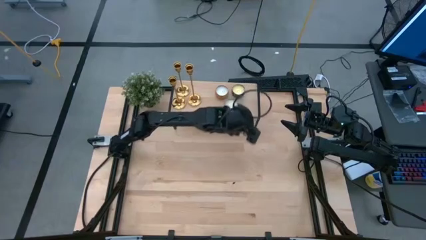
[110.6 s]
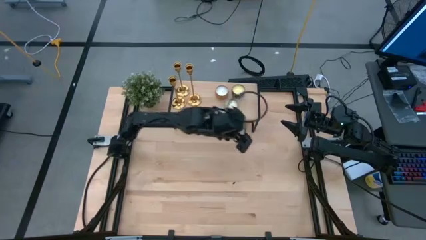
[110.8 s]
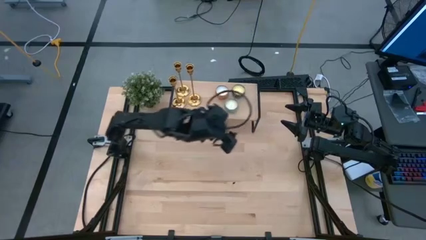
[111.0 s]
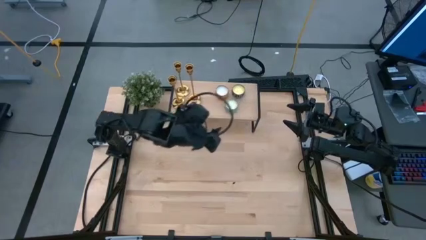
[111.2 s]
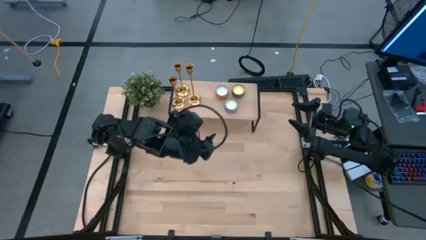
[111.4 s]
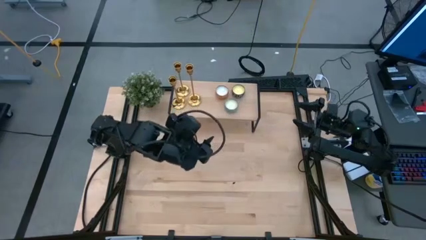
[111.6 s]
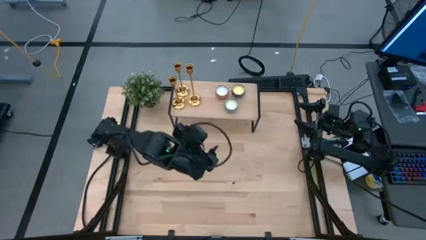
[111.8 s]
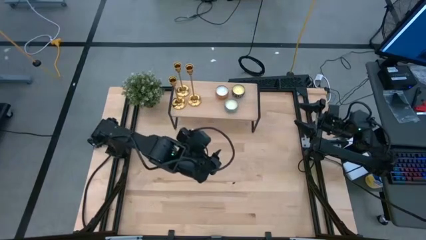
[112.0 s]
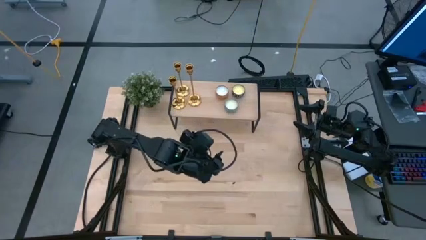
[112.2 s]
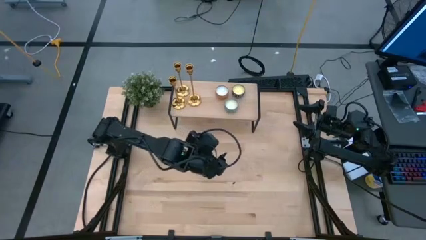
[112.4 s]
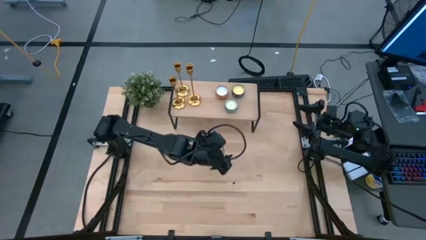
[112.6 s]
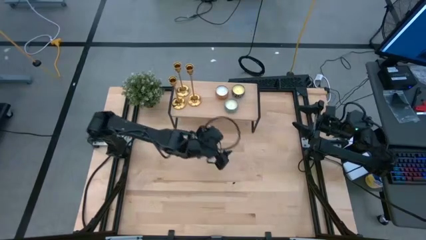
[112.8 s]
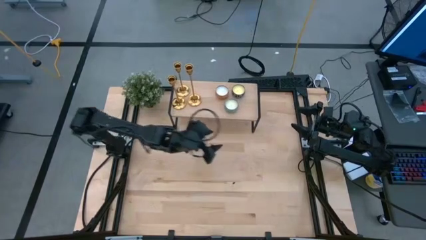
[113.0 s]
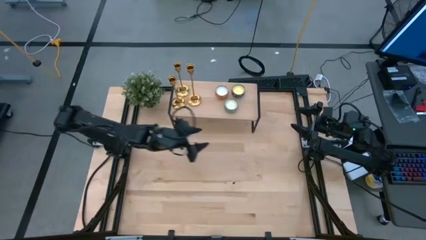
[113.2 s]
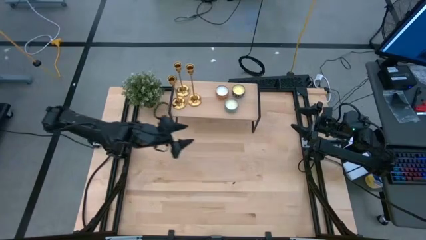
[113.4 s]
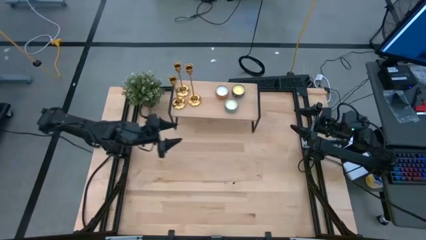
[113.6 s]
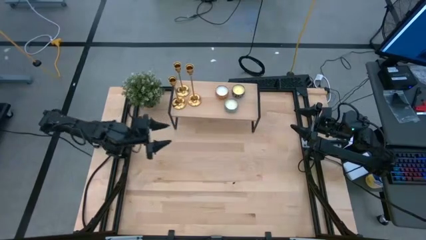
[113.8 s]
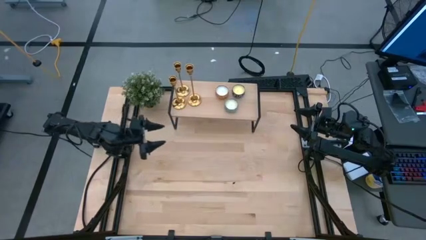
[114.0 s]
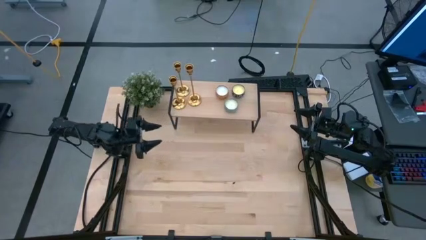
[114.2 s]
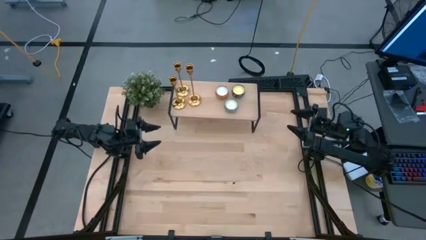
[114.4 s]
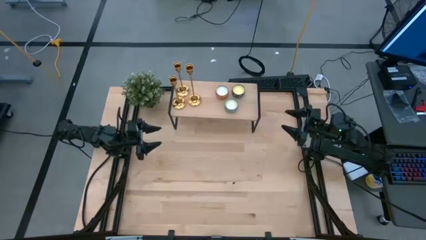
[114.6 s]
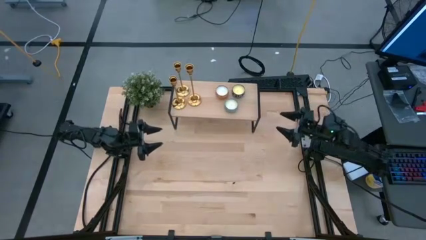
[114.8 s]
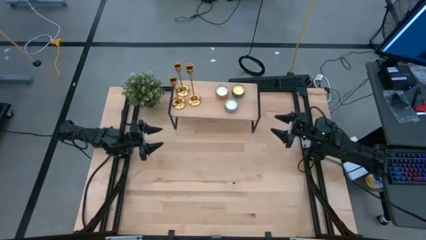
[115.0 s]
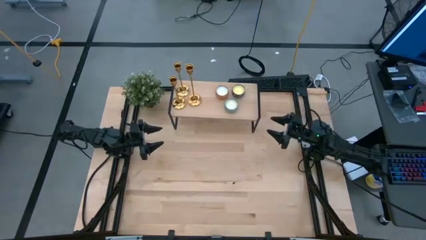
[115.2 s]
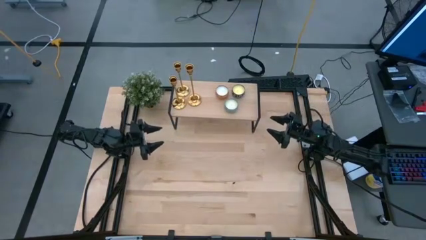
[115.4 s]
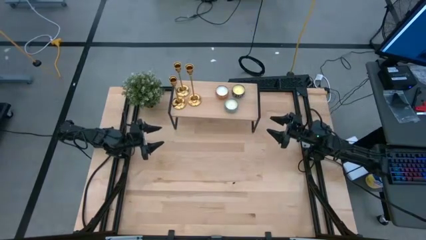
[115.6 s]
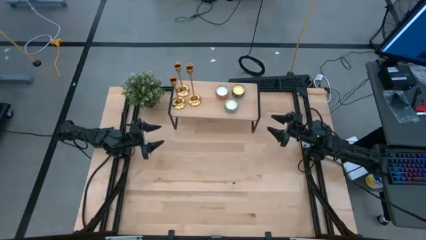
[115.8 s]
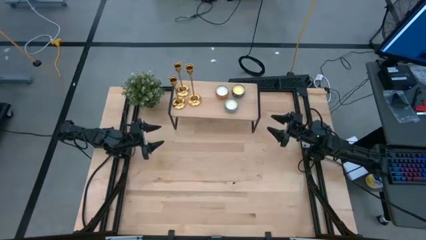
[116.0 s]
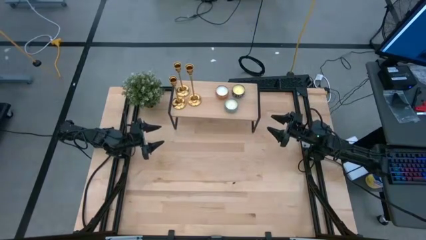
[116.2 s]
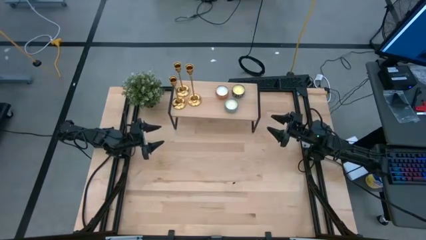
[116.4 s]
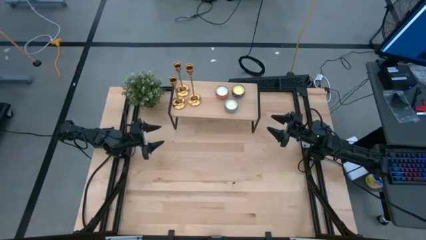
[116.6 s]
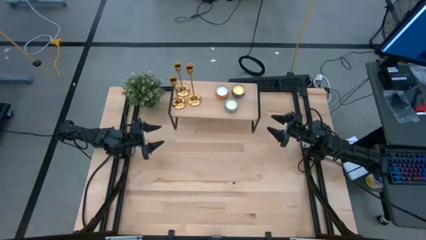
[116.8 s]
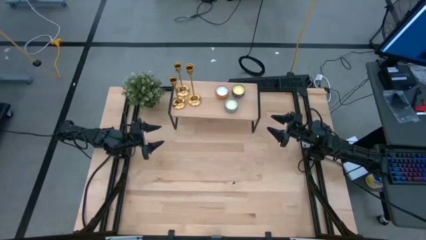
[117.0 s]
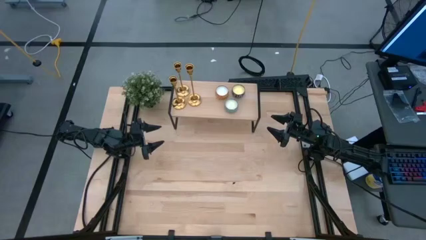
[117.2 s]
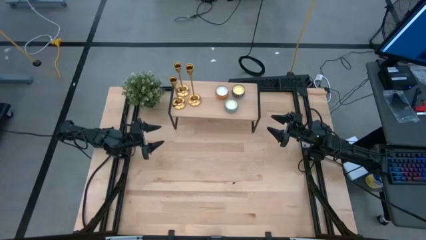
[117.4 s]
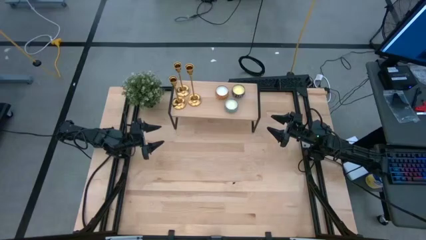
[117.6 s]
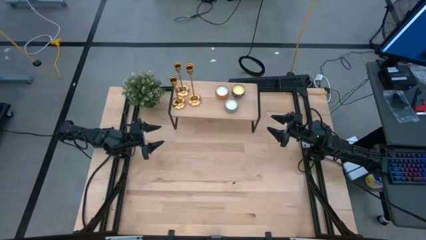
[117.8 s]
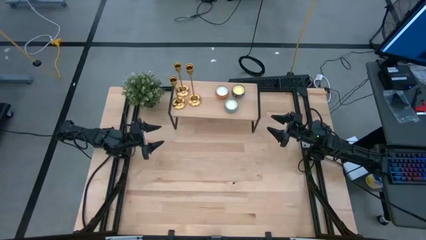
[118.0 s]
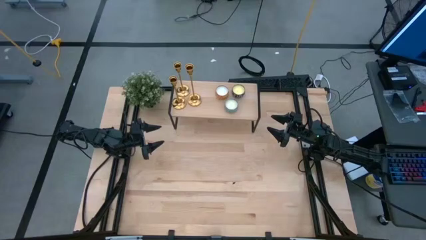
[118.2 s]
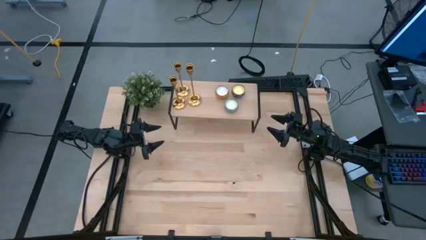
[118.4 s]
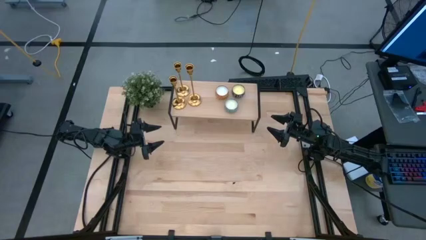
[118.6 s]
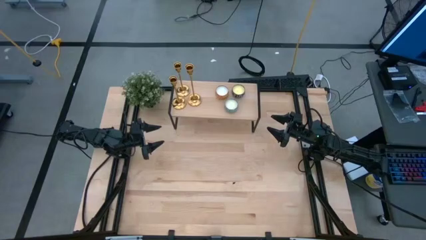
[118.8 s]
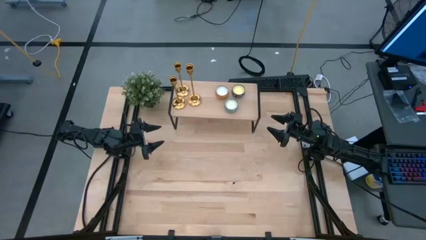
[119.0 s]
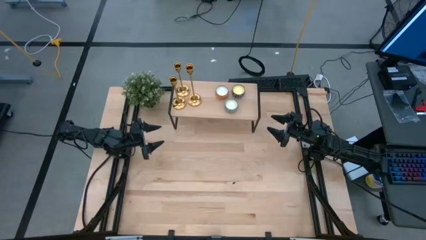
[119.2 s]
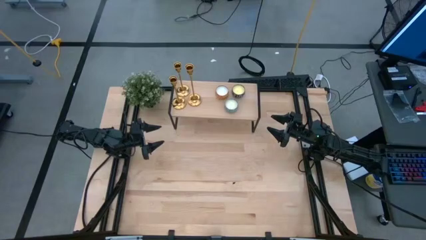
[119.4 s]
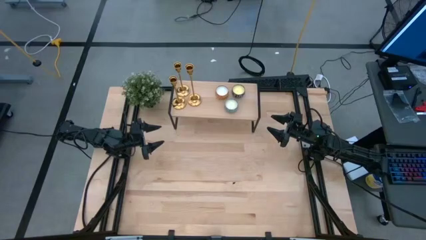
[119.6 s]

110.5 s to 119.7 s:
Task: Pick & Place candle stick holders
Return to Home Position

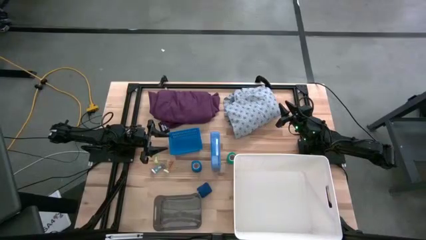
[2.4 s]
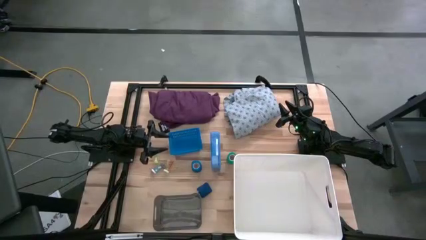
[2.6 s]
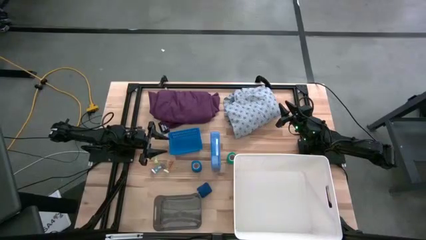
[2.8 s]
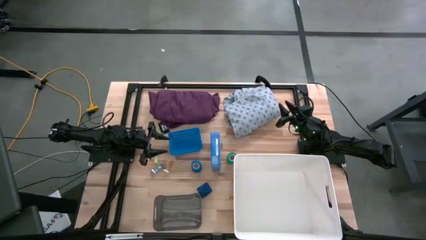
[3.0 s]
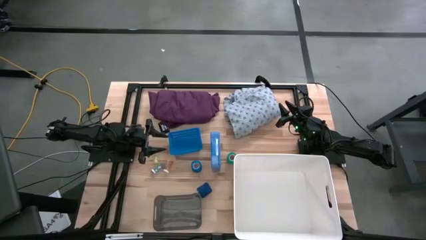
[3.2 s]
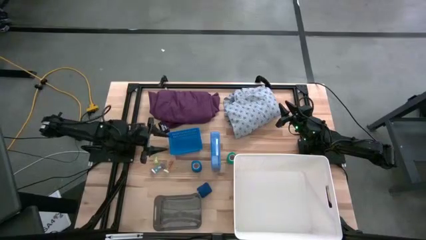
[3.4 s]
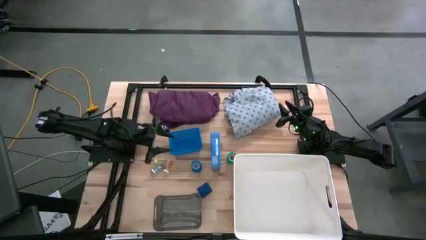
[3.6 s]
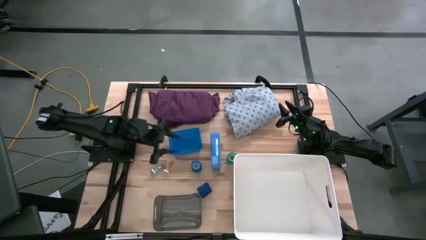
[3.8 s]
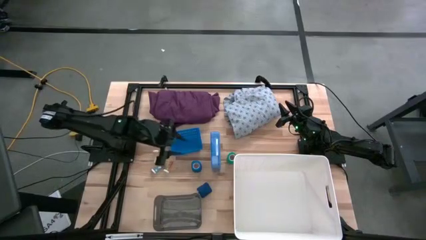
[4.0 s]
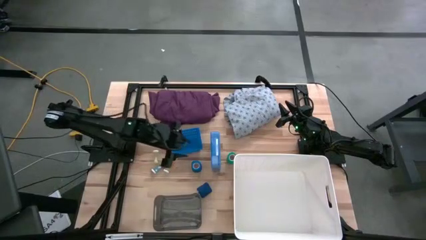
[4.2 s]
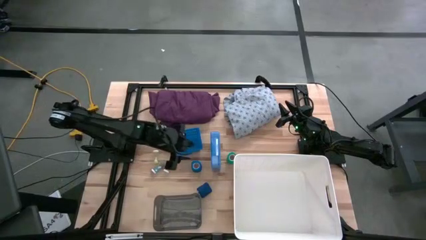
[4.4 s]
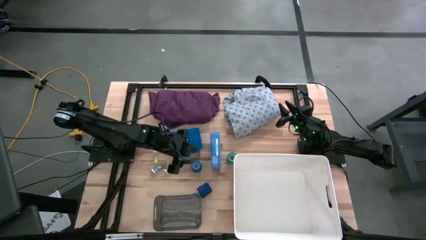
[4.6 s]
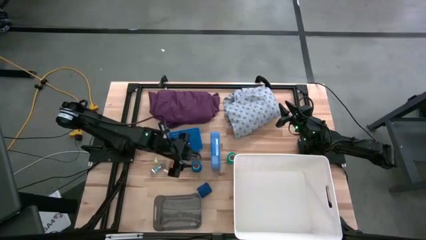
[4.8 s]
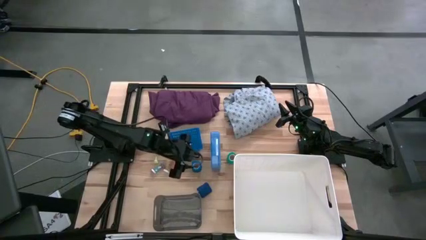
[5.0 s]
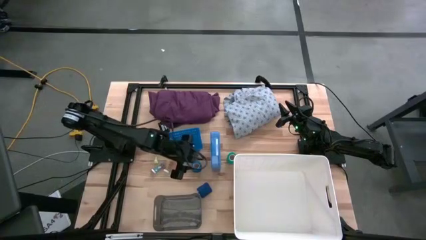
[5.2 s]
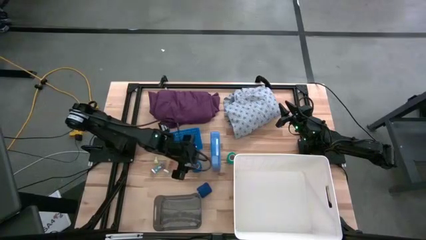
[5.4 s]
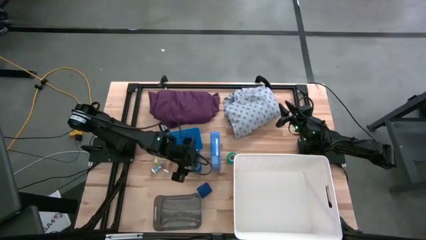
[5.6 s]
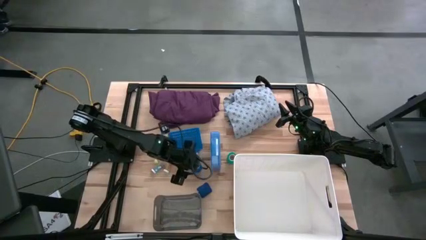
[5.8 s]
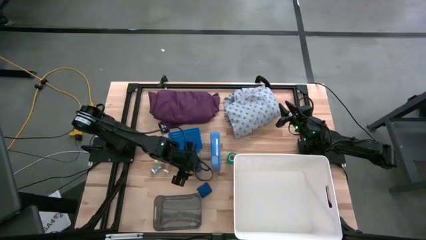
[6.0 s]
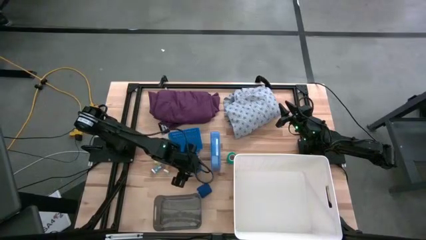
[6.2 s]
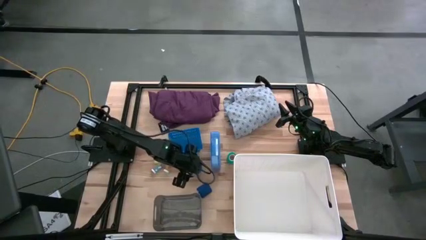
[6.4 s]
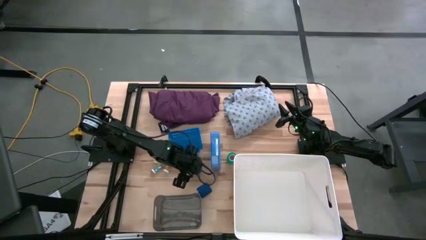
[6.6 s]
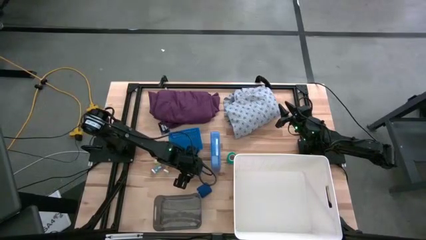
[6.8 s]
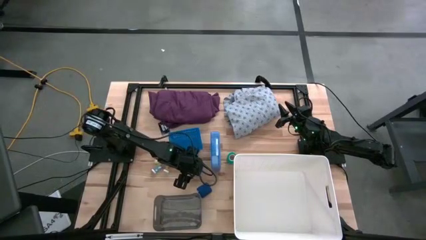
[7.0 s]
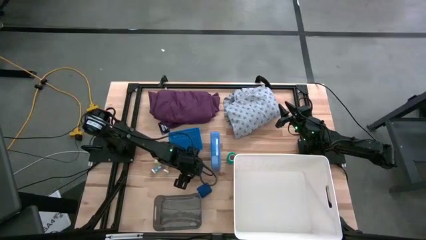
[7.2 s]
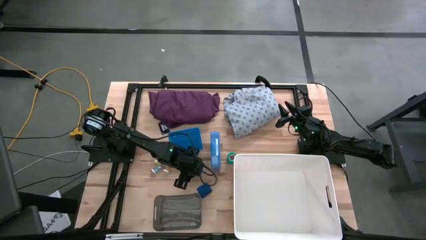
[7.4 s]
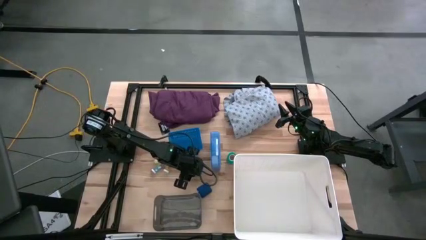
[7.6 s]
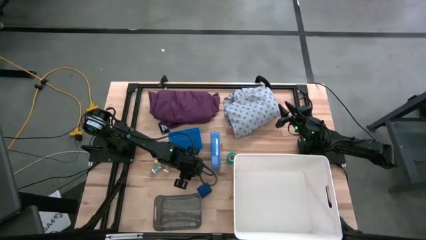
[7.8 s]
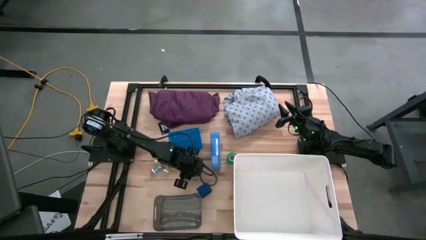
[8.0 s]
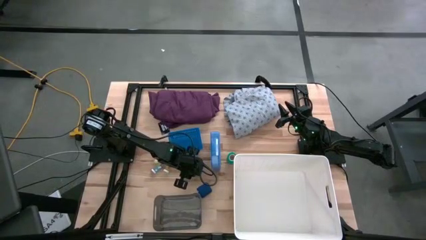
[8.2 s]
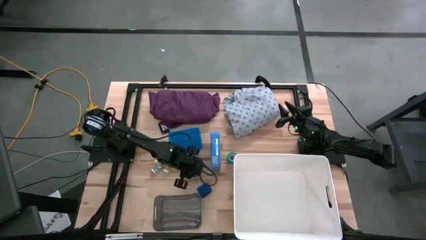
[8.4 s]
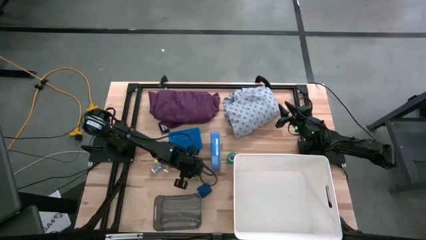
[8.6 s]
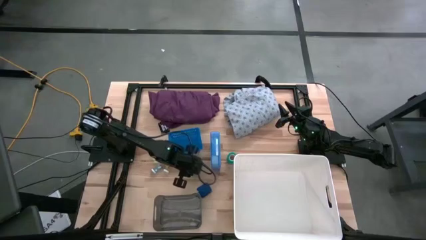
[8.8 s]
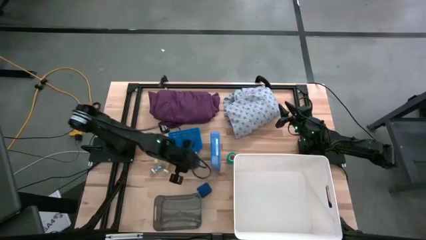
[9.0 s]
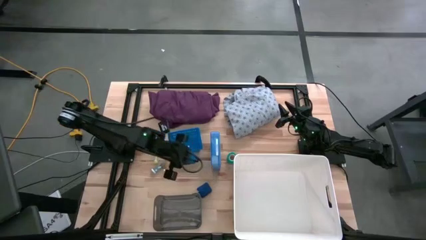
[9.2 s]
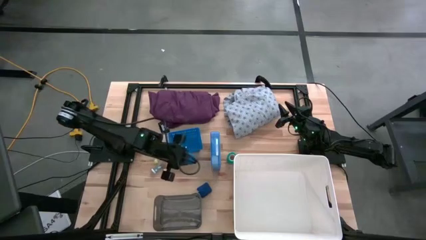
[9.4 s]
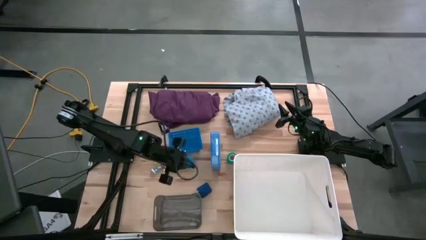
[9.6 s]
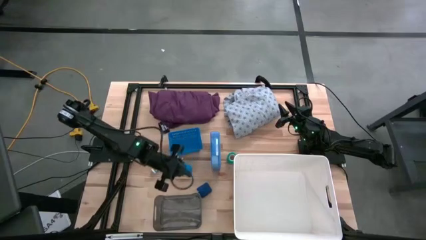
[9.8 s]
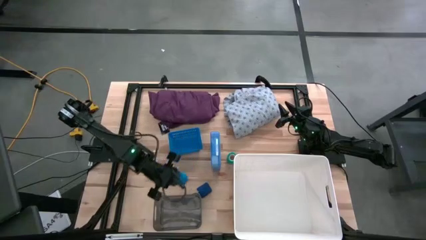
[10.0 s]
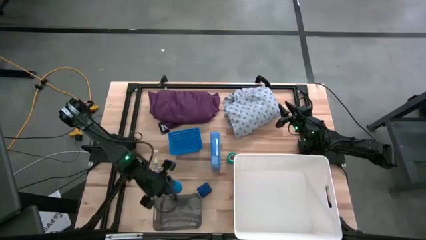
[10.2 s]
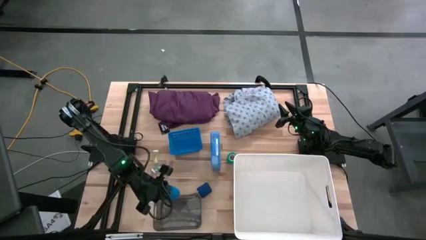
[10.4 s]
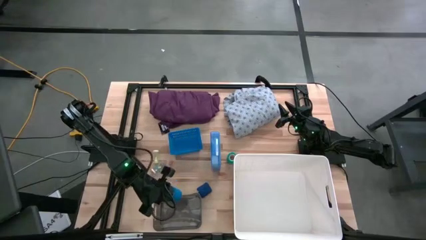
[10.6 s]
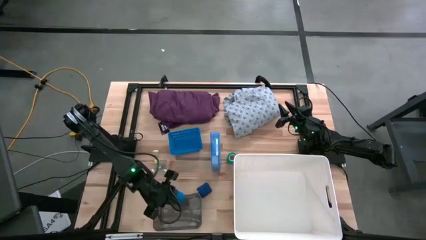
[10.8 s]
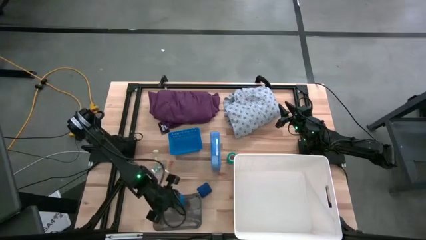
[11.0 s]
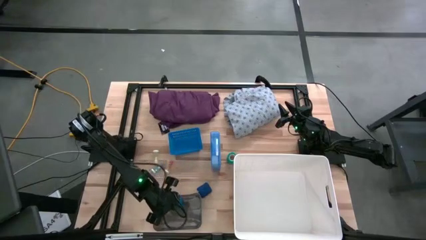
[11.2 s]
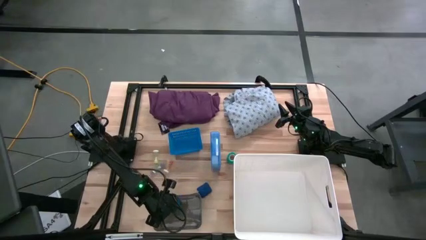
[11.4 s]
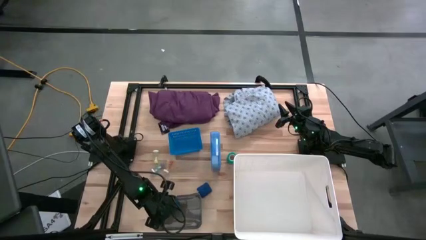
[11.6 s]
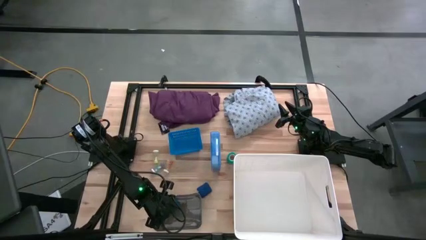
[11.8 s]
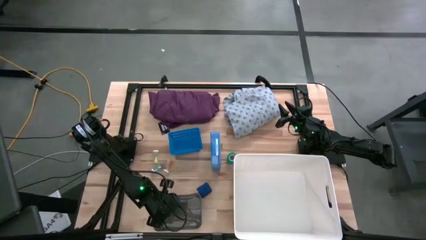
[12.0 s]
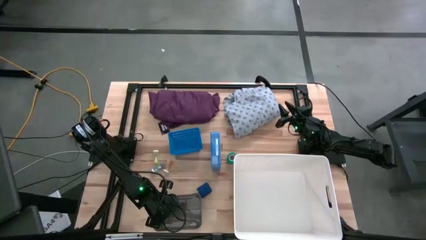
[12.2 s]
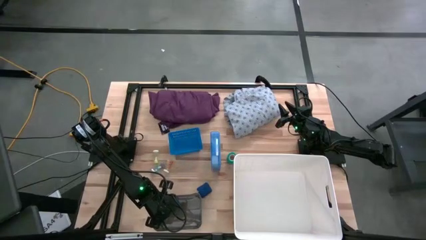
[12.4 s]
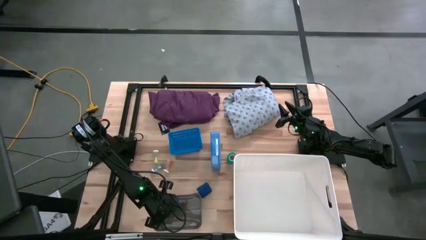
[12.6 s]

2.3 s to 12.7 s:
Task: Pick & Place Medicine items
Put the top blue bandage into the black bin
